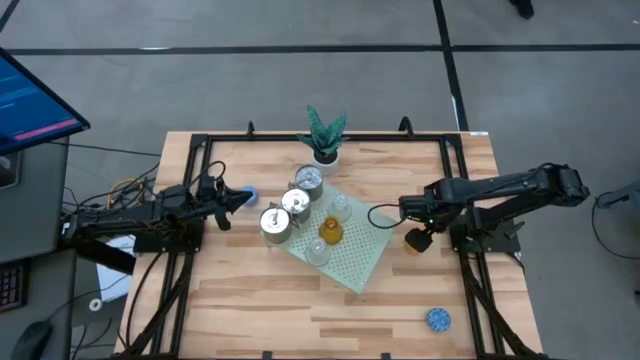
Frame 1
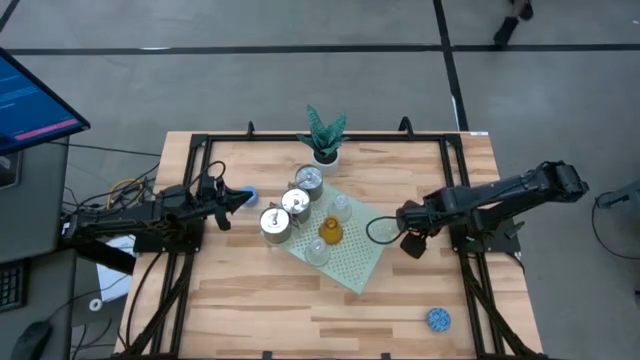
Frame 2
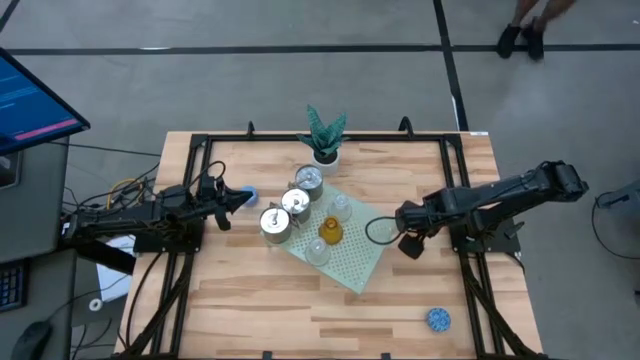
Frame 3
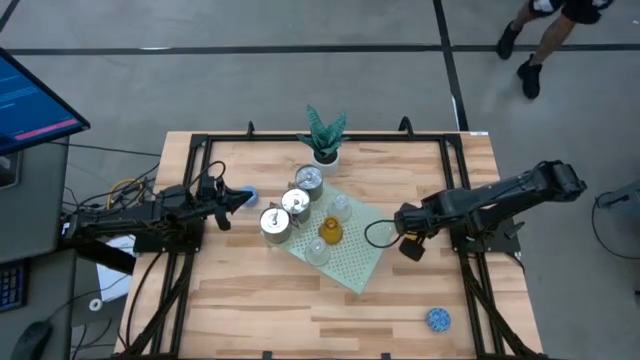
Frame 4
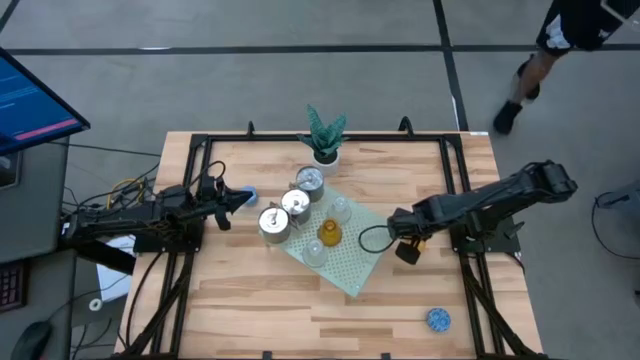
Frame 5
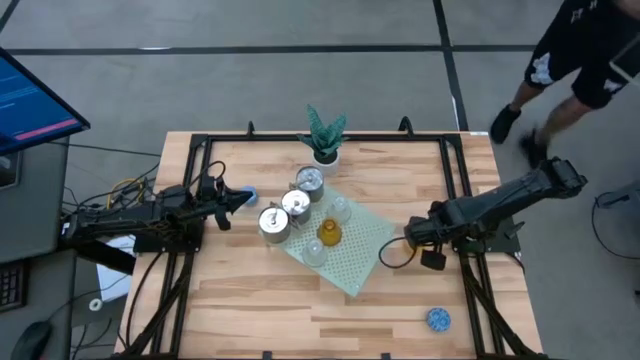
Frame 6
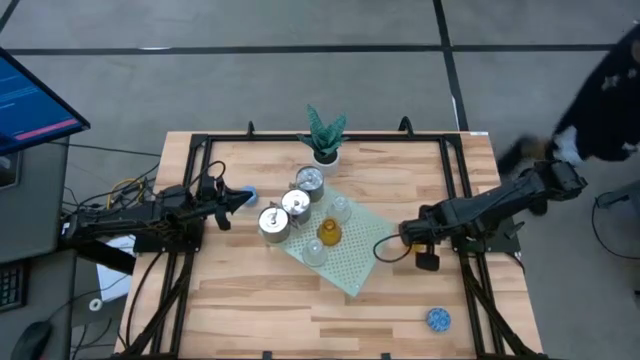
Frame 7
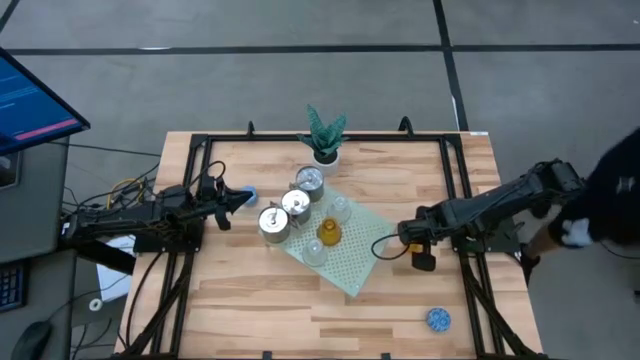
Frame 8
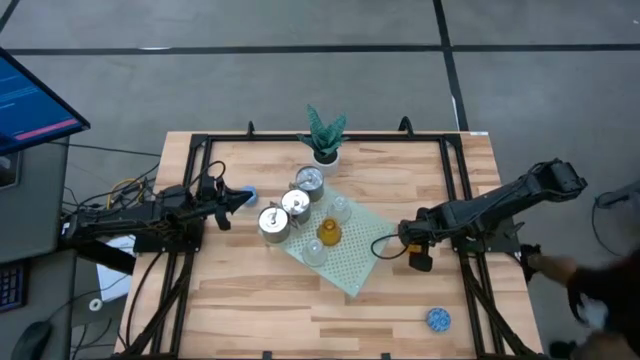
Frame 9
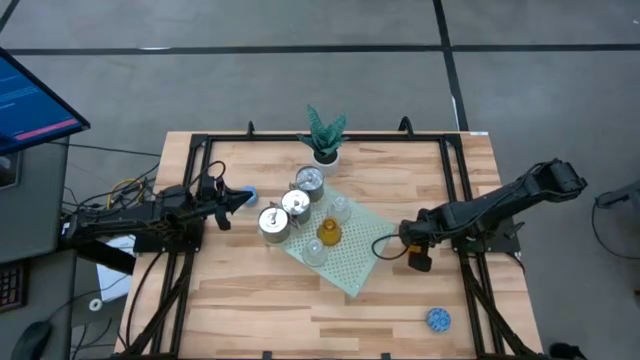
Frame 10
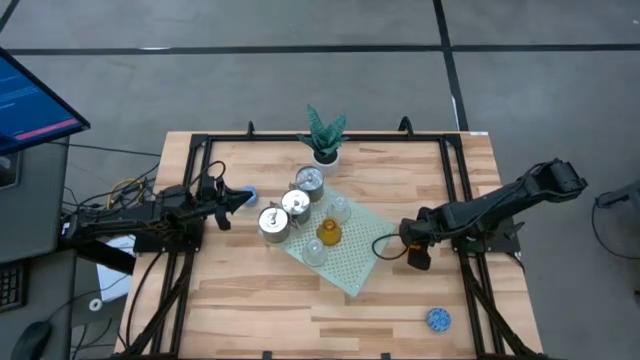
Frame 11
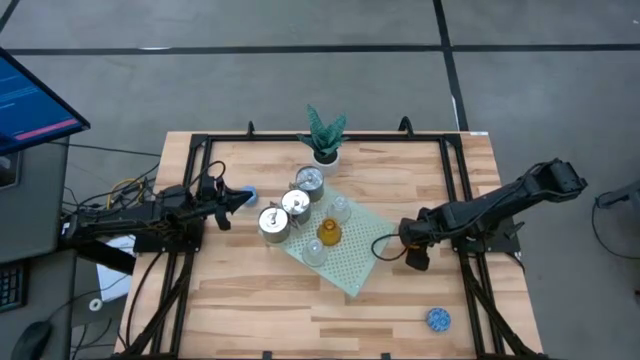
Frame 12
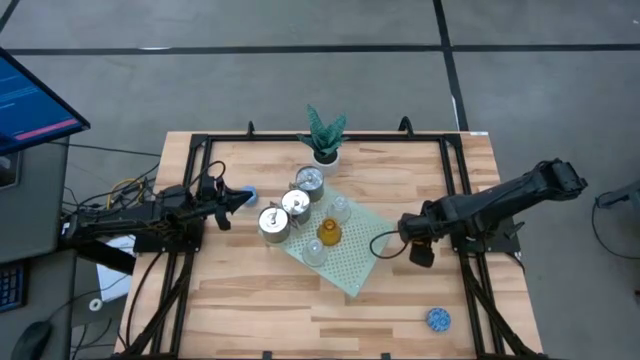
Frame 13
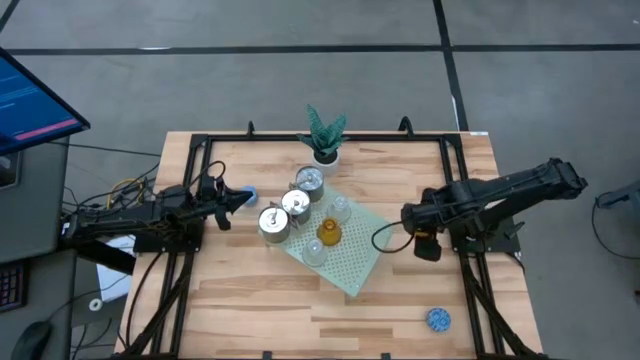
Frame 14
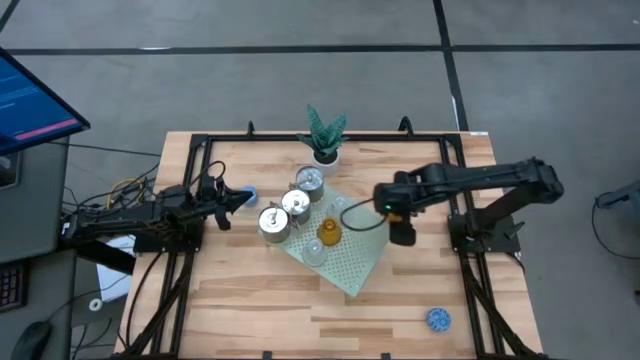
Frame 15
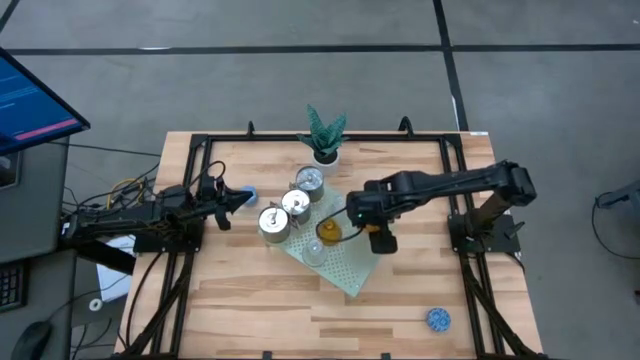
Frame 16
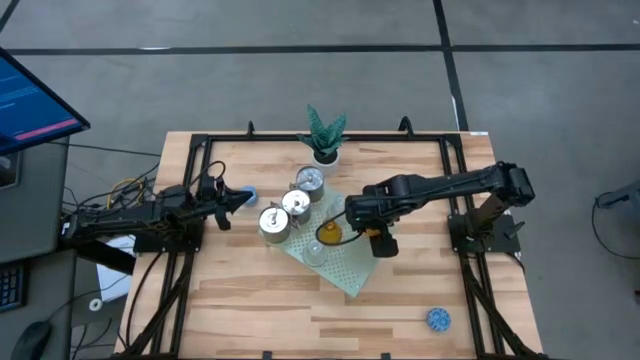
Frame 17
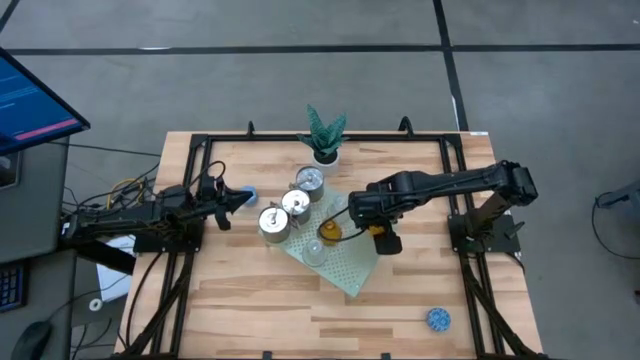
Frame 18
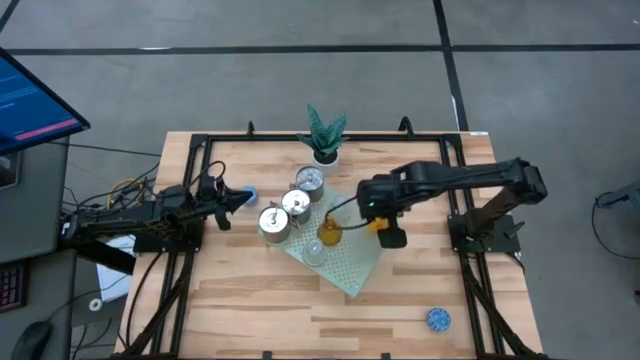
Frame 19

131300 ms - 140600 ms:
Task: Pick & Place candle stick holders
Put the yellow scented candle on the shelf

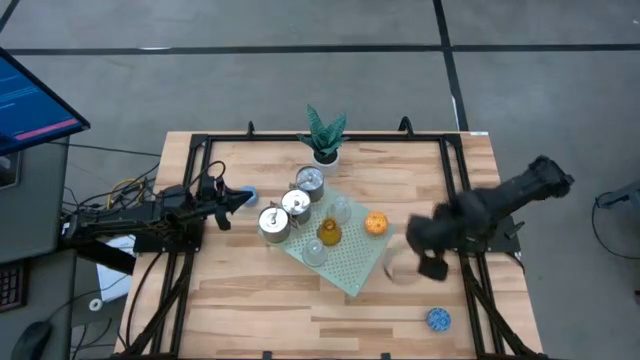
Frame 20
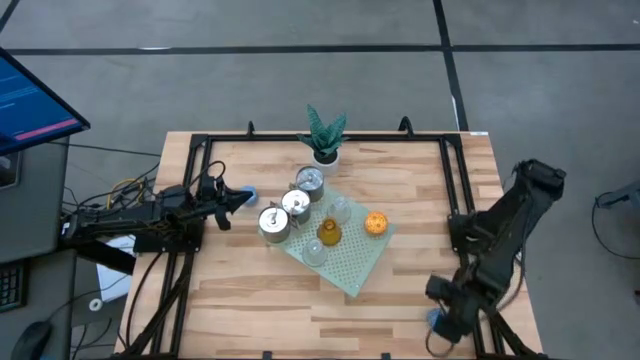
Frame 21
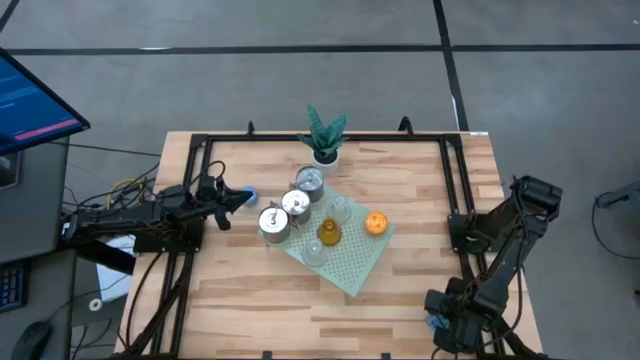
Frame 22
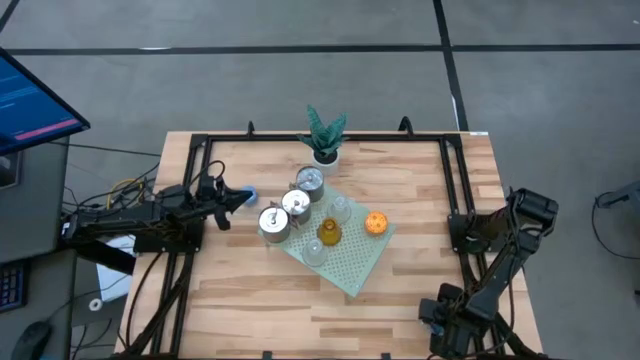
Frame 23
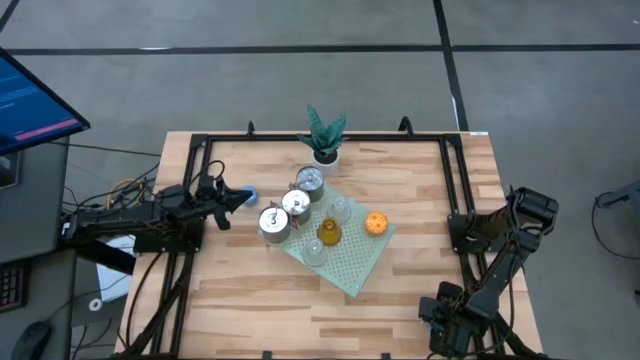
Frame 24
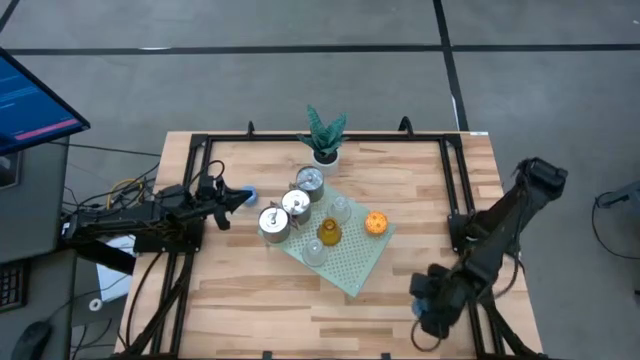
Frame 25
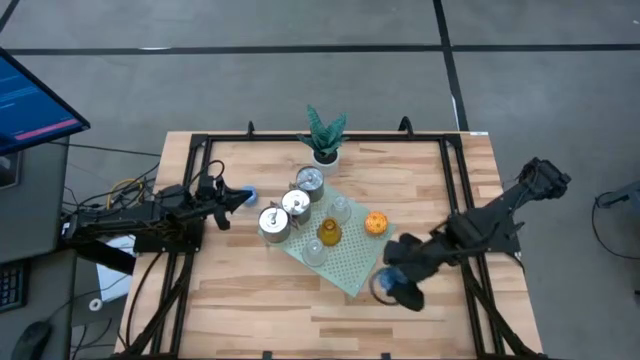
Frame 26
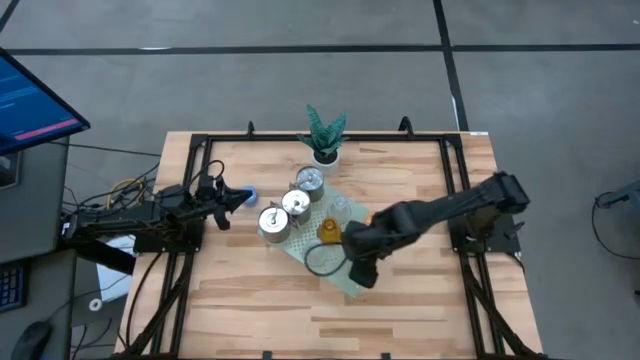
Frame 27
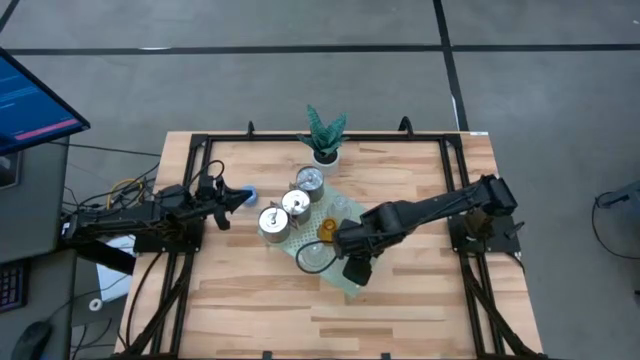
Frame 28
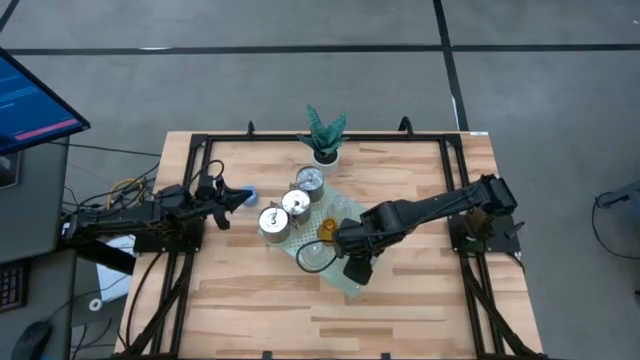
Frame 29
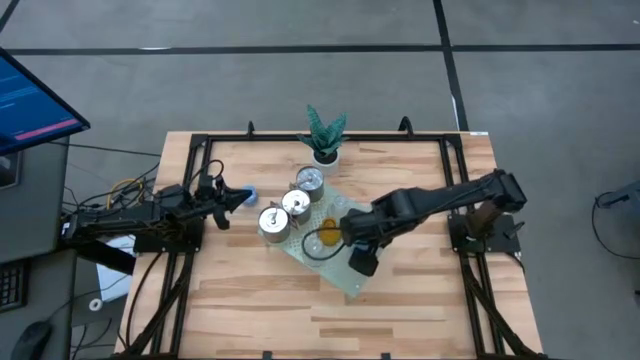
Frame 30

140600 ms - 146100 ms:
Put the blue scented candle on the shelf

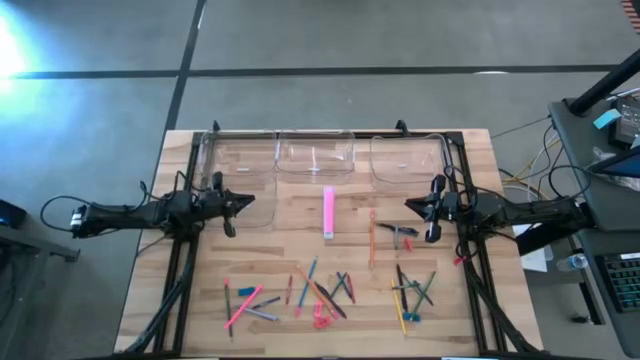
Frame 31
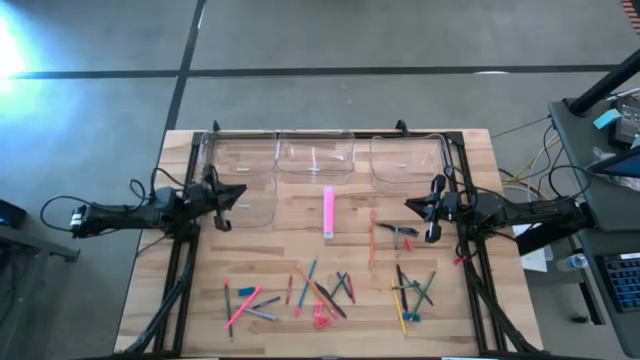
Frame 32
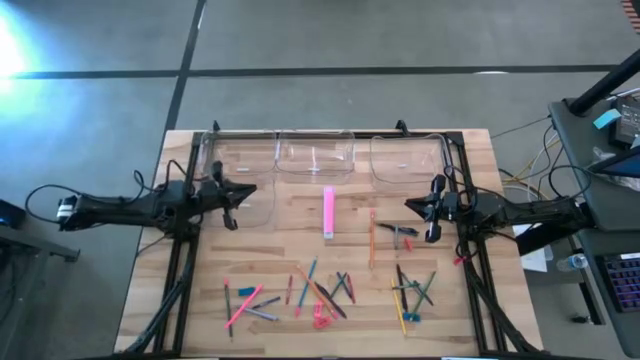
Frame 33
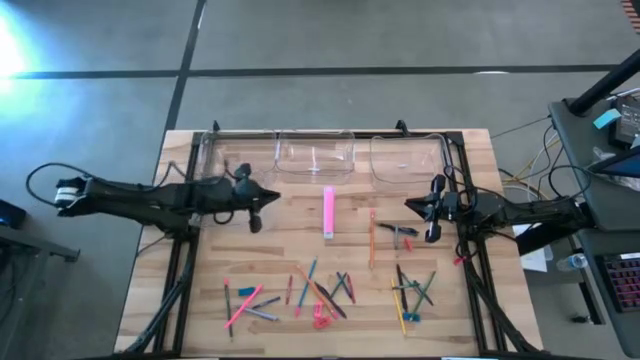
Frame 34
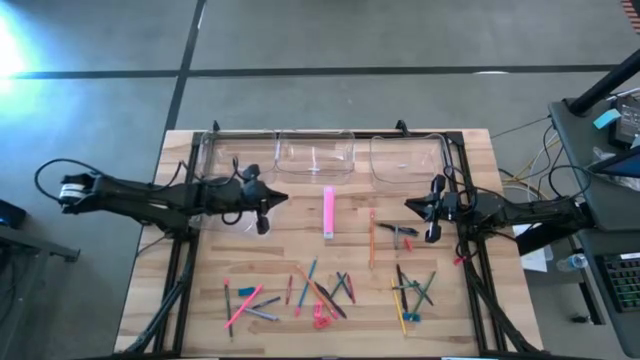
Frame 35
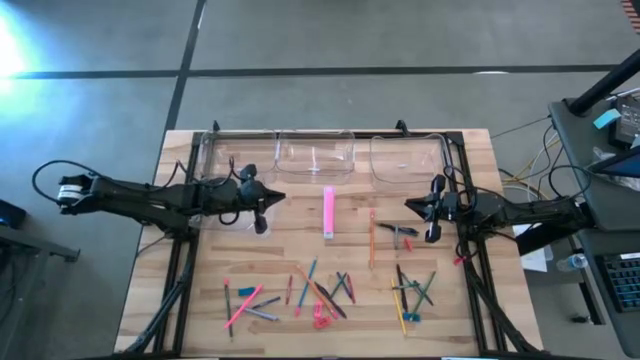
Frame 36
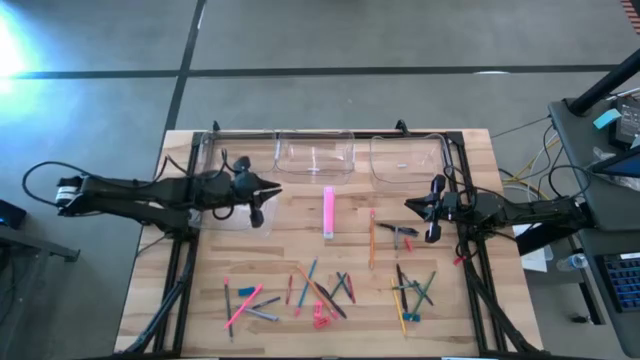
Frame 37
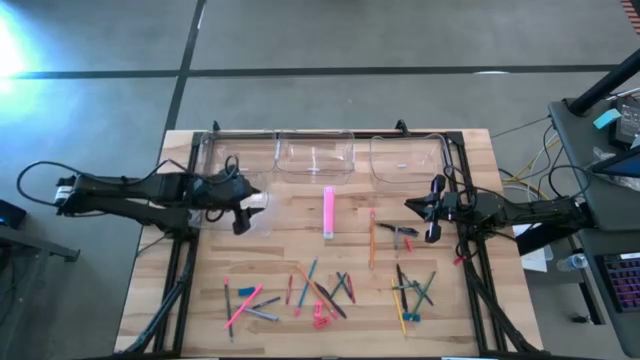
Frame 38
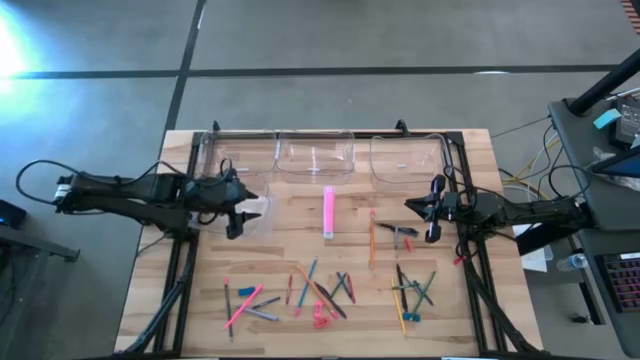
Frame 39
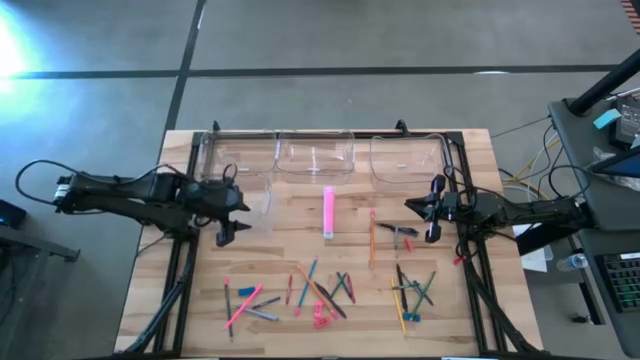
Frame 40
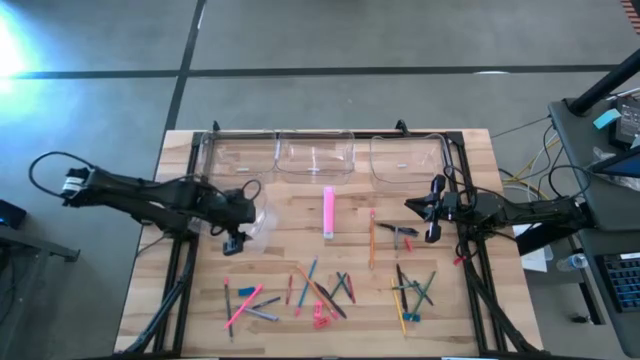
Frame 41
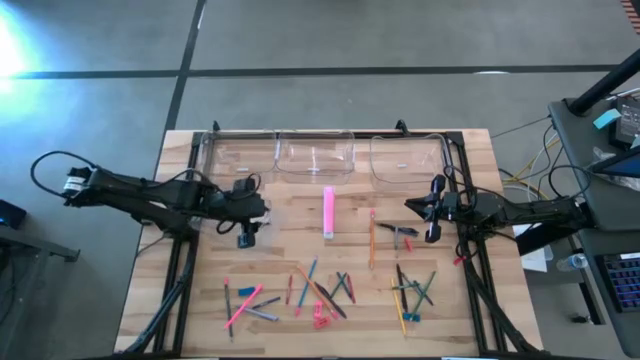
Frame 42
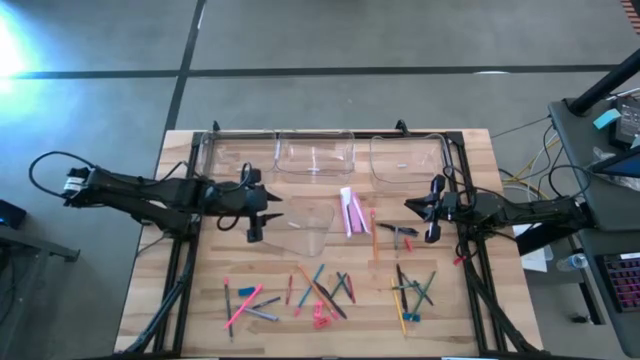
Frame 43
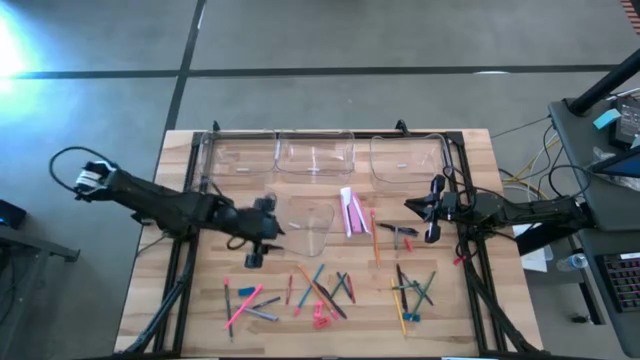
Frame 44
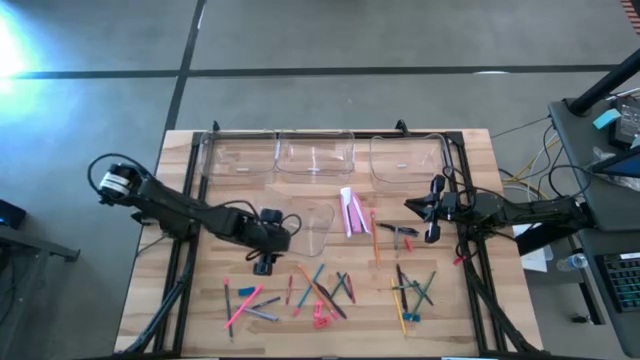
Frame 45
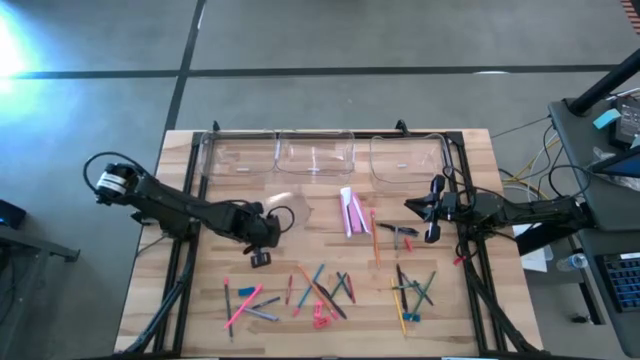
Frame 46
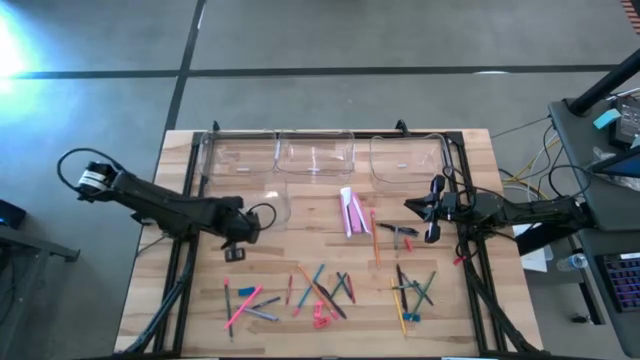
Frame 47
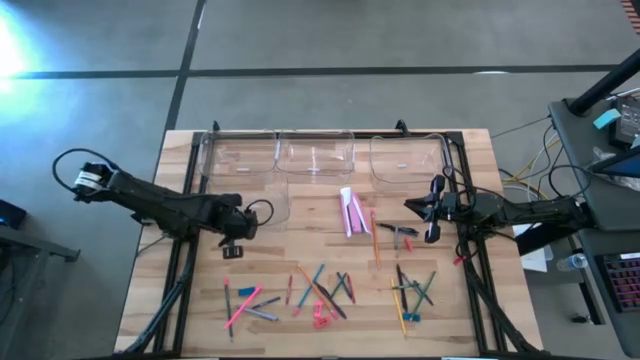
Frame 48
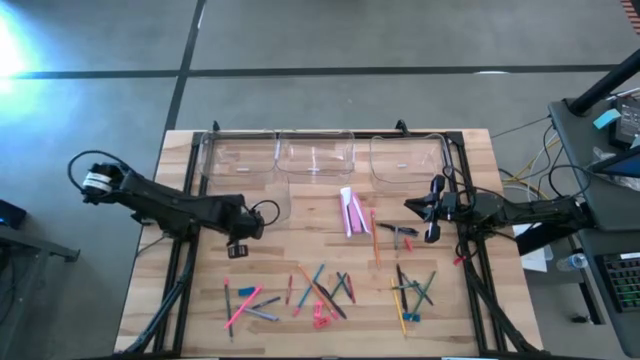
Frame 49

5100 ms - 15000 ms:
Task: Sort crayons/erasers/pens/pencils in bins
Adjust the bottom left transparent bin
